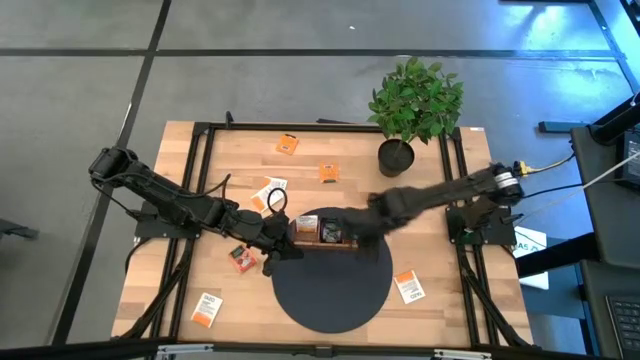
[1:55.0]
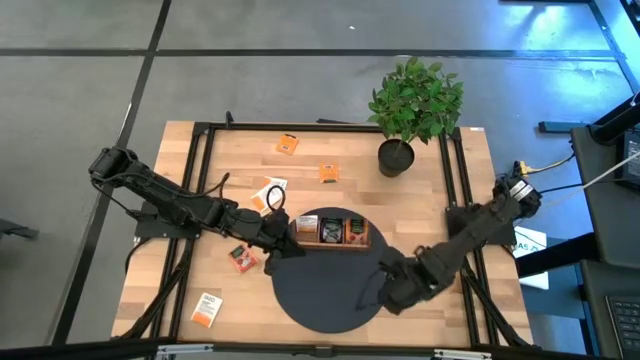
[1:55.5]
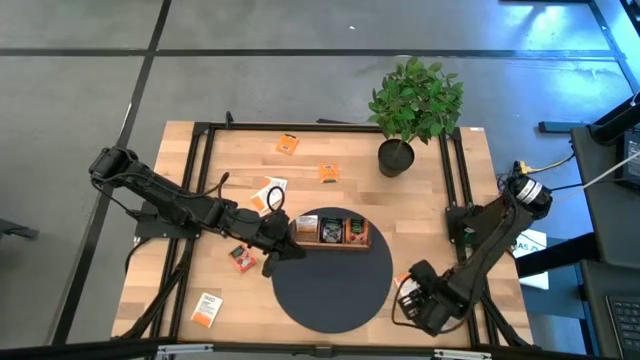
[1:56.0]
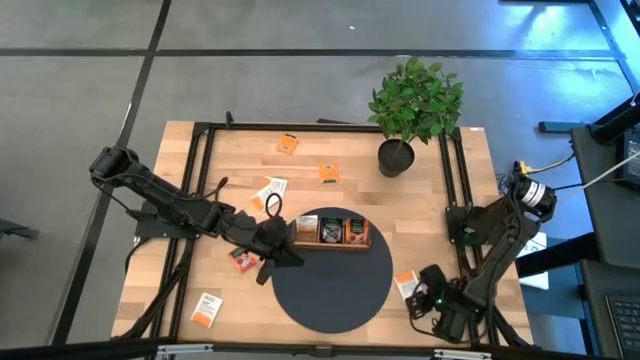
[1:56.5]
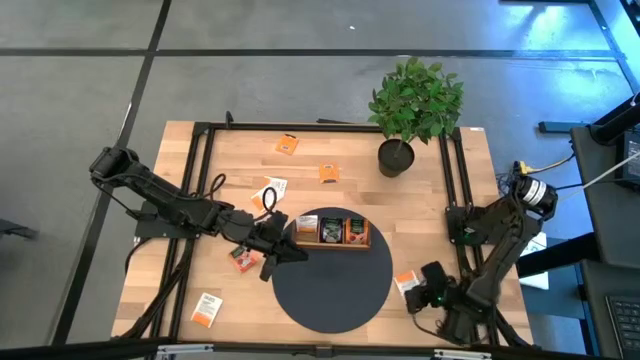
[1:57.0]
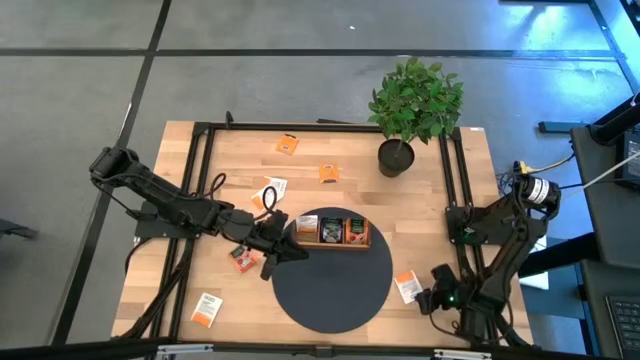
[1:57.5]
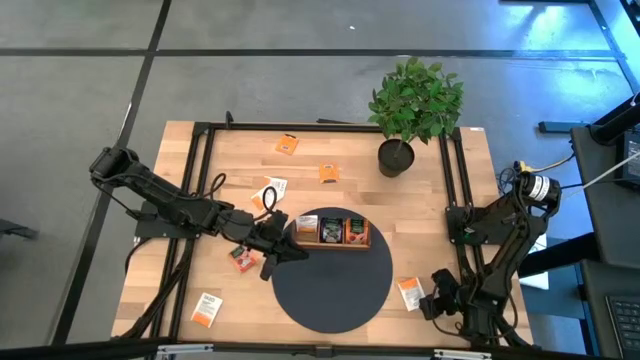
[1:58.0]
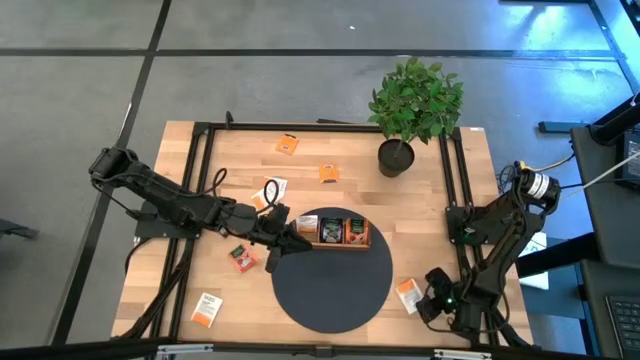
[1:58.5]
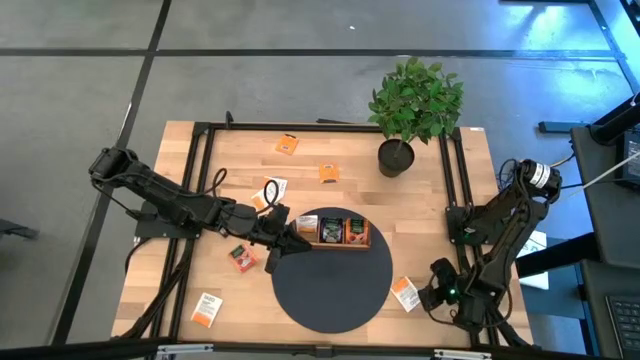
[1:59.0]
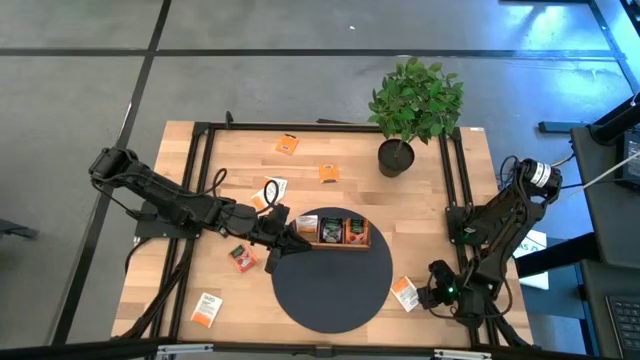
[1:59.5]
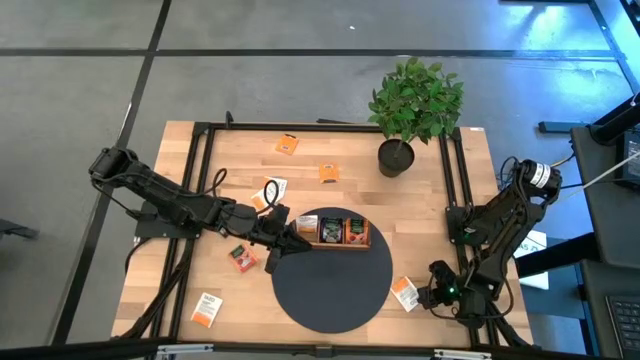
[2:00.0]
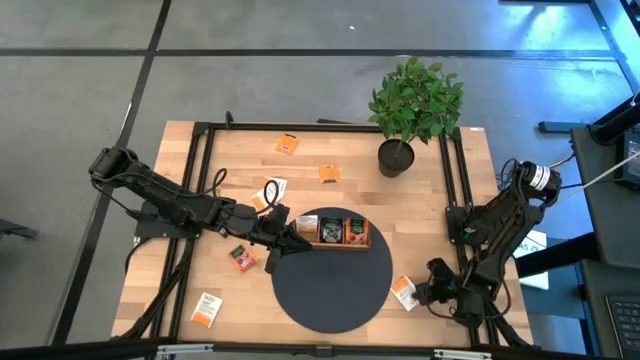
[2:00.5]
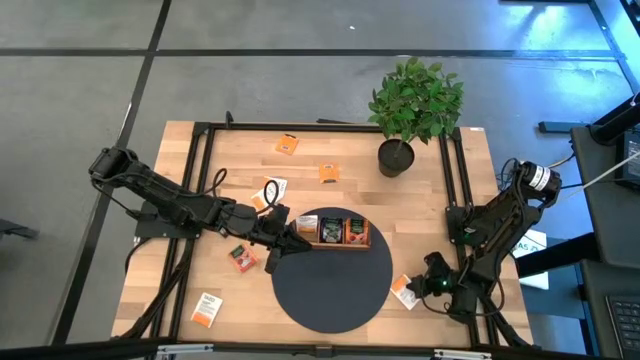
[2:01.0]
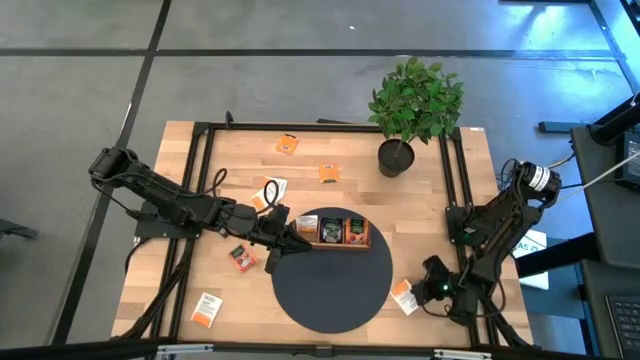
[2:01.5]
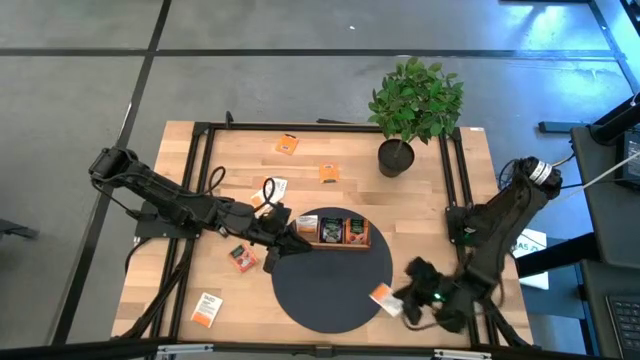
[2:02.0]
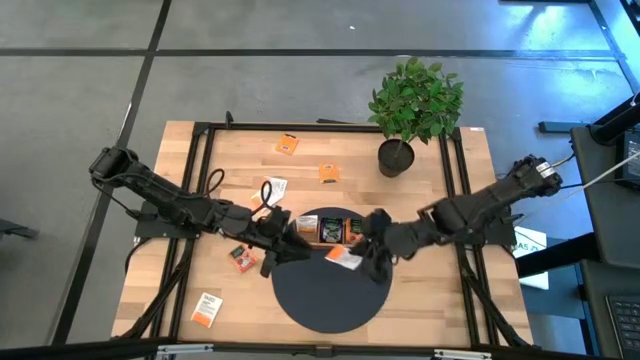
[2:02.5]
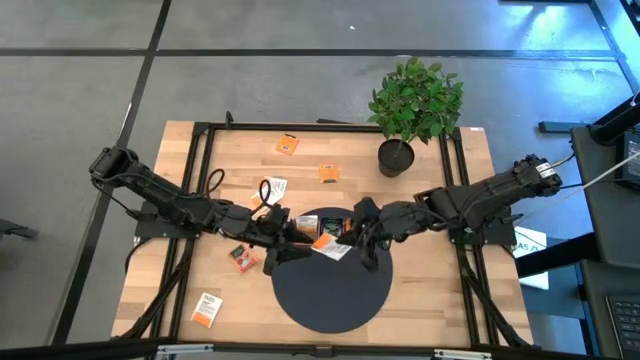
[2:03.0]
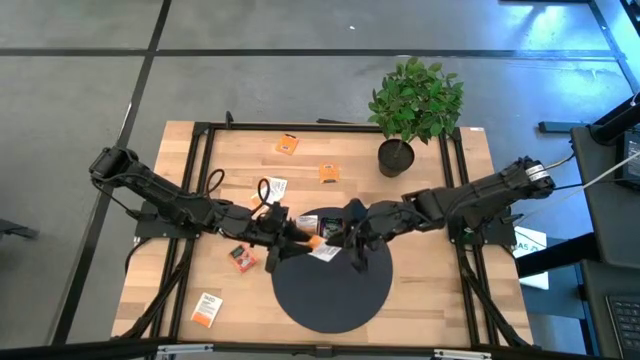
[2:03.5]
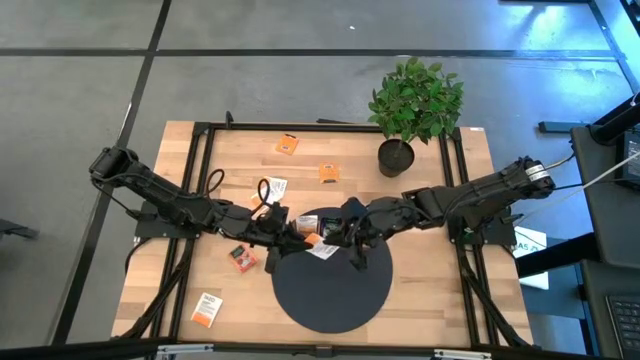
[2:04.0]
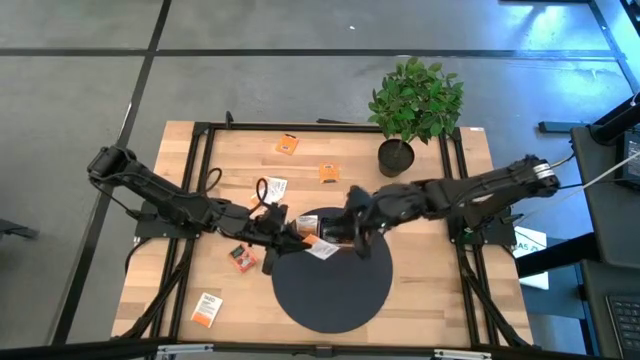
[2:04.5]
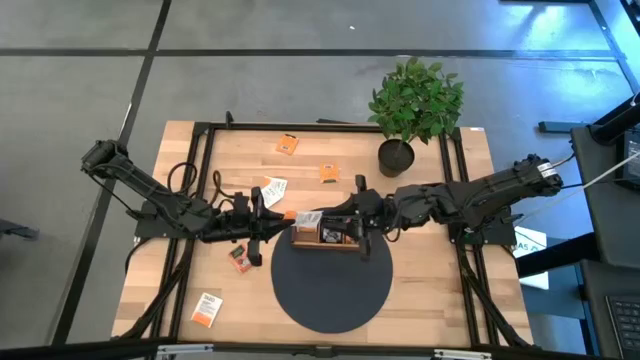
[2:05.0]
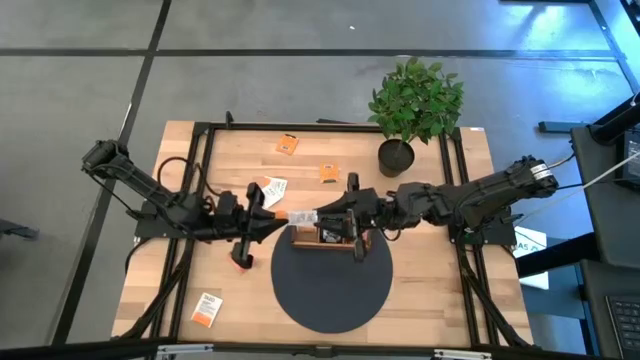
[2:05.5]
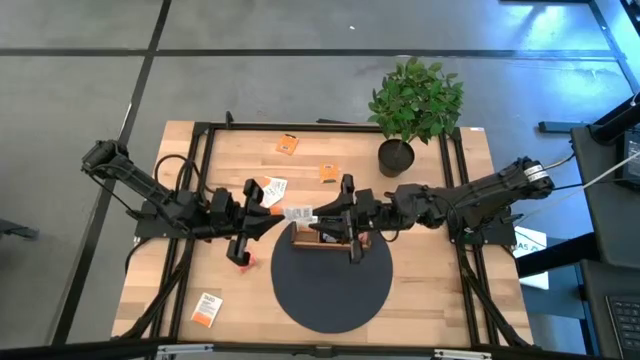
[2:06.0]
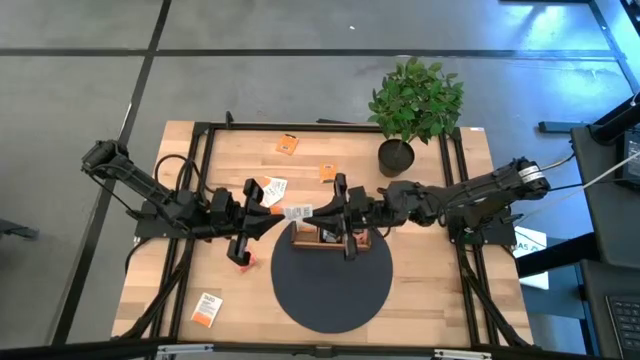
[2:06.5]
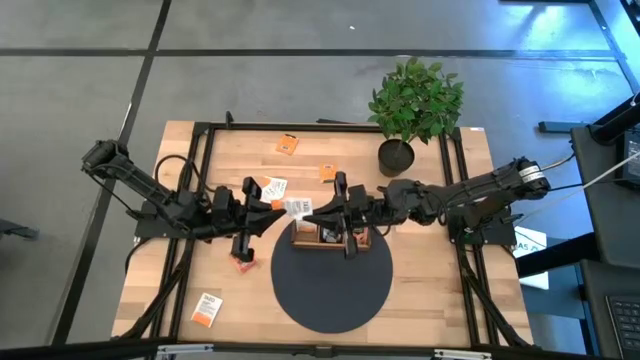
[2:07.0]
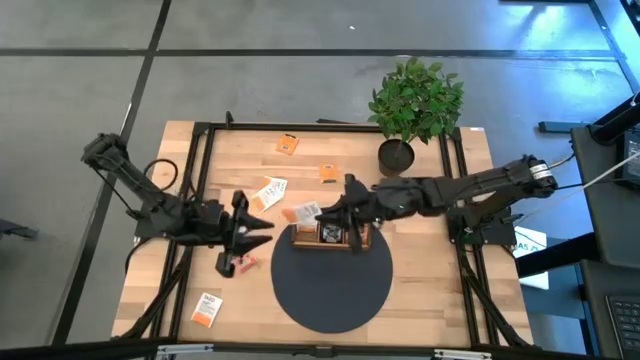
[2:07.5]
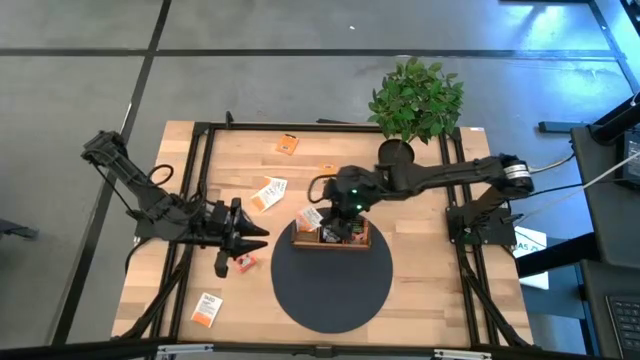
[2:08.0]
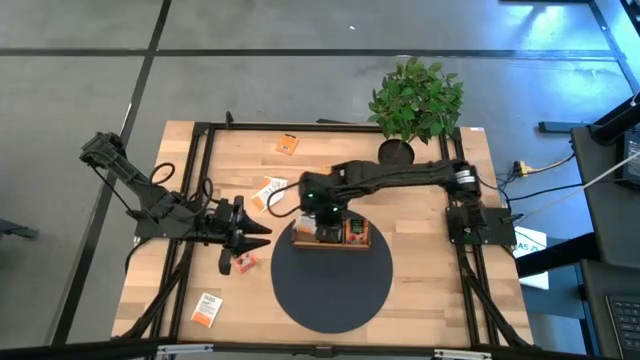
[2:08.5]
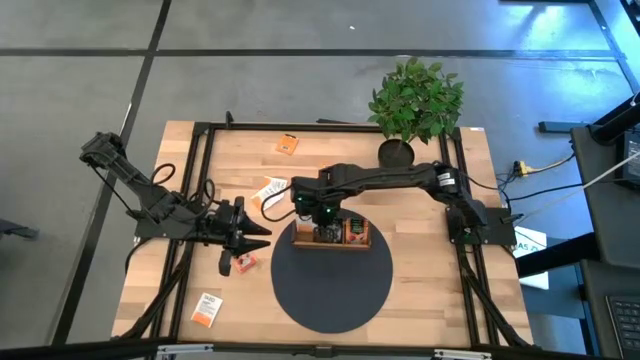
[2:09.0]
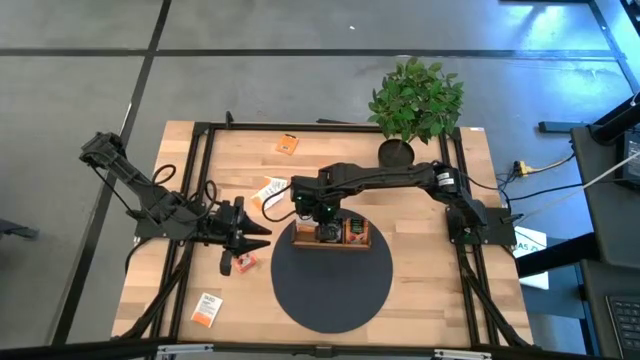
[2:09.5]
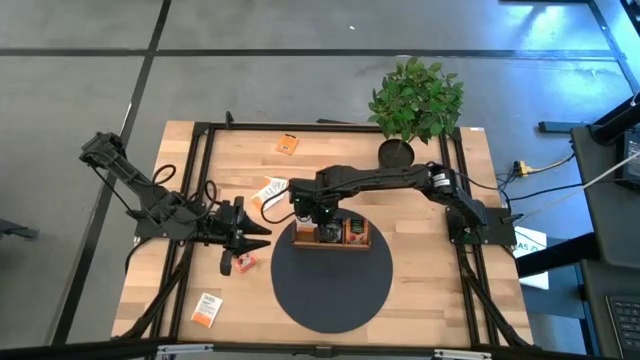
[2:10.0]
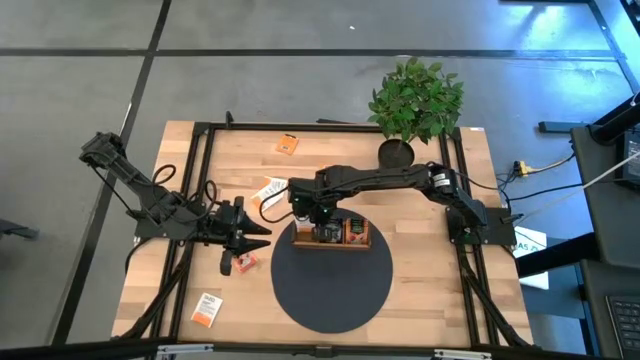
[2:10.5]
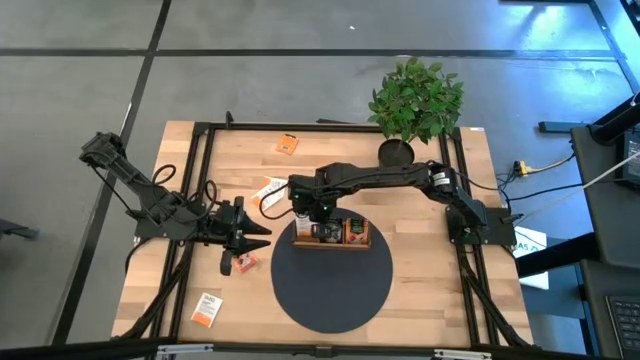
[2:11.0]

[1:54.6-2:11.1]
Task: Pick & Place Tea
Put the white tea bag into the left section of the wooden organizer

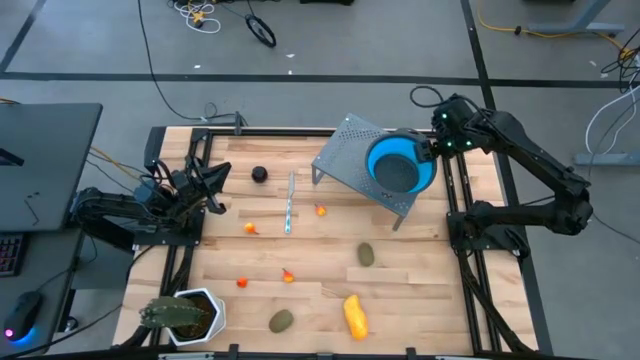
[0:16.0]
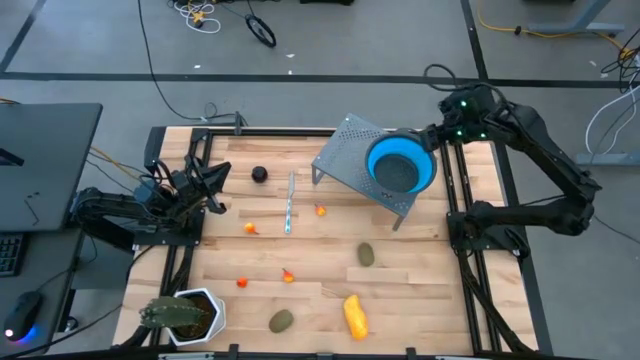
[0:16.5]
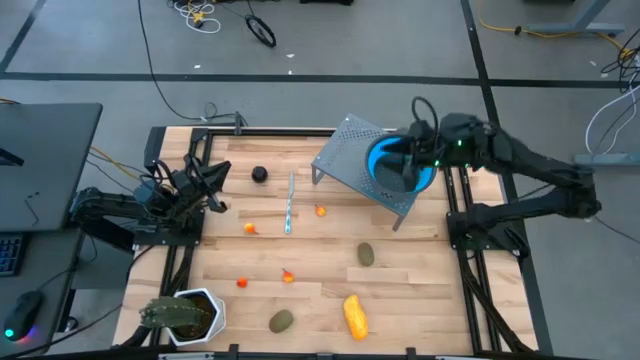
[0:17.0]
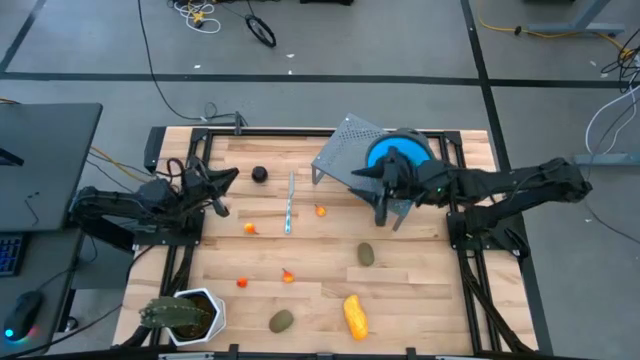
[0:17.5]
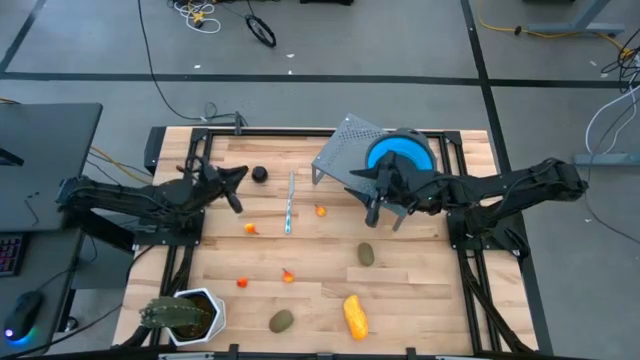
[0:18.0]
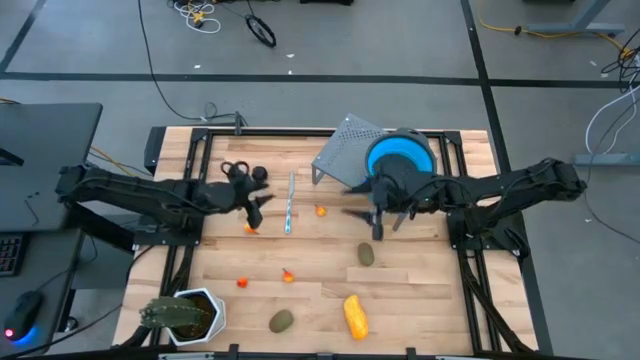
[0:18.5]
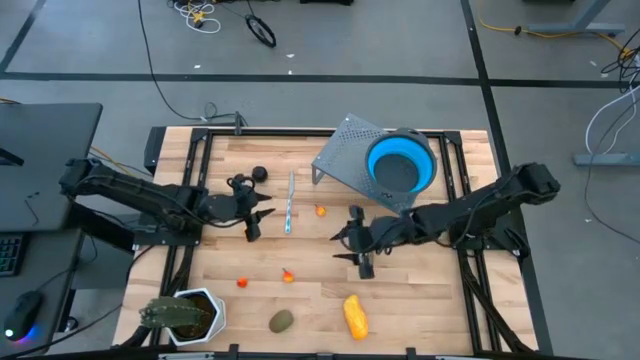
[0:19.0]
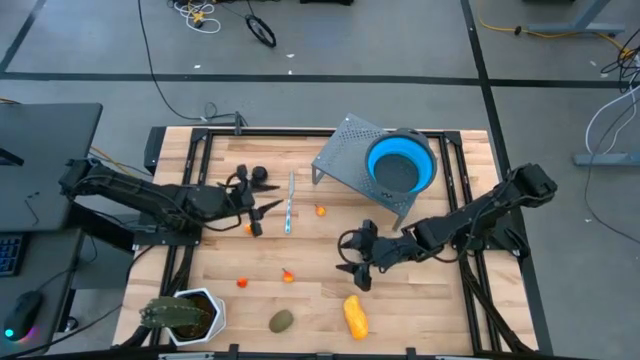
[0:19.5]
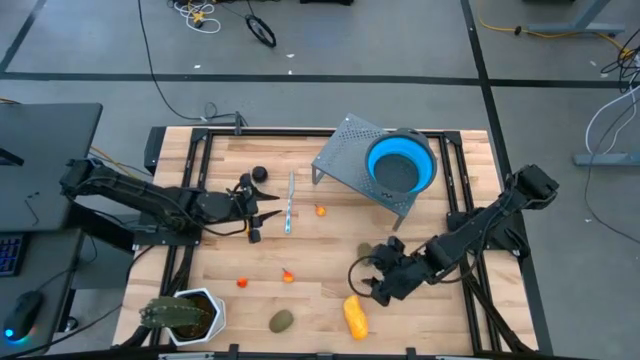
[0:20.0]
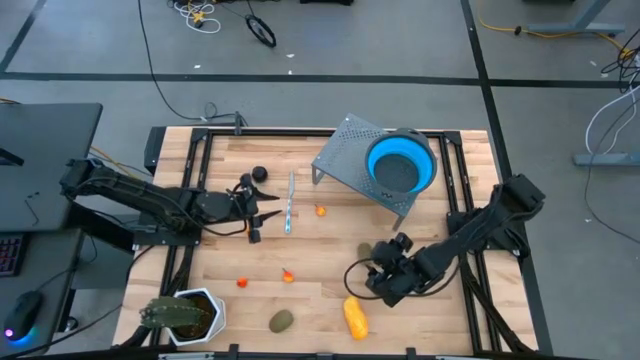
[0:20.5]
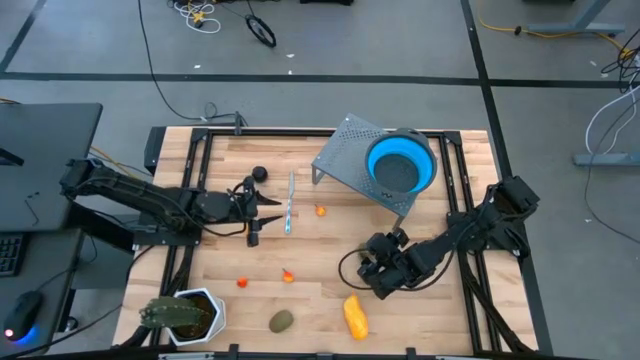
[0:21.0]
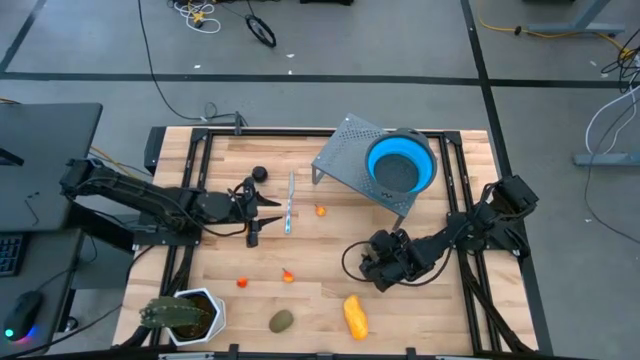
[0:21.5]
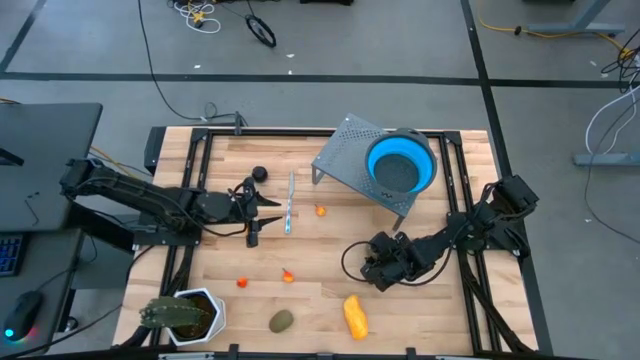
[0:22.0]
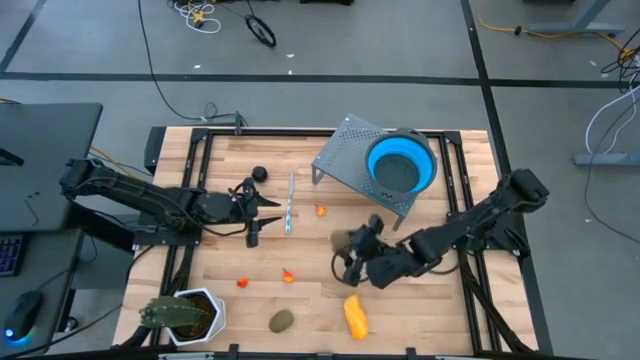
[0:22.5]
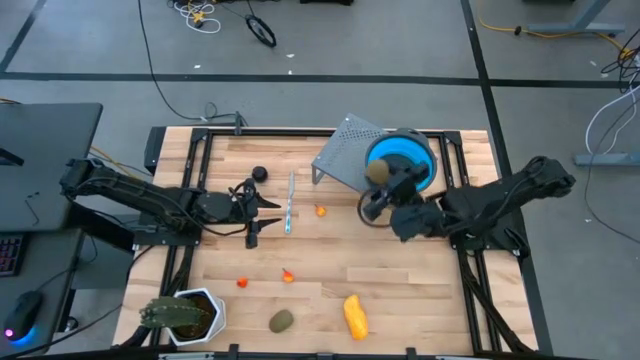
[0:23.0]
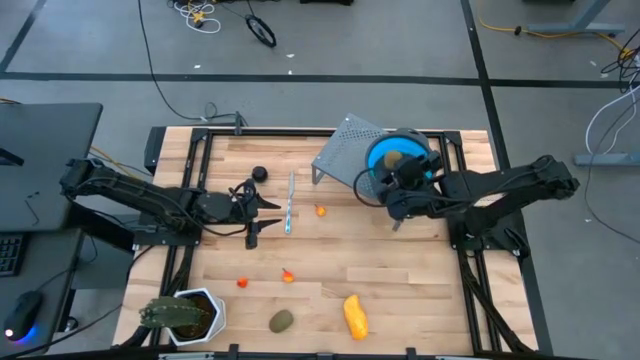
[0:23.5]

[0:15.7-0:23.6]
Task: Pick & Place Fruit
Put the brown kiwi in the blue strainer bowl on the shelf
